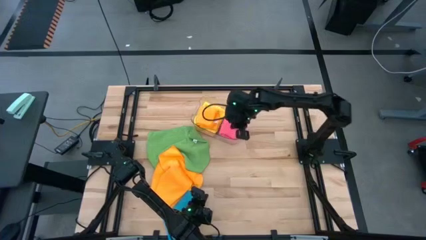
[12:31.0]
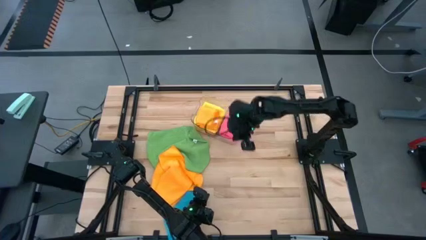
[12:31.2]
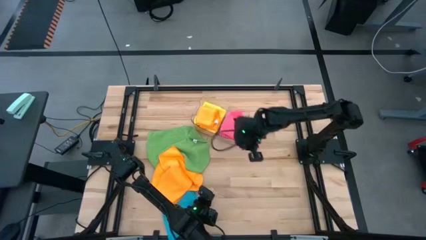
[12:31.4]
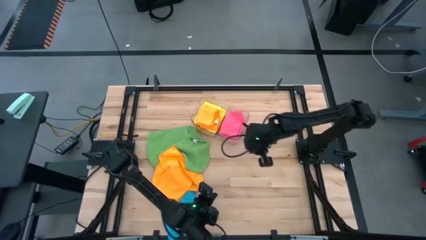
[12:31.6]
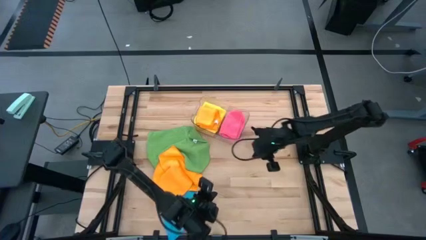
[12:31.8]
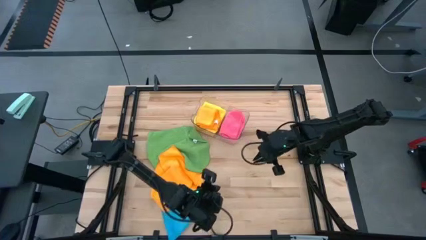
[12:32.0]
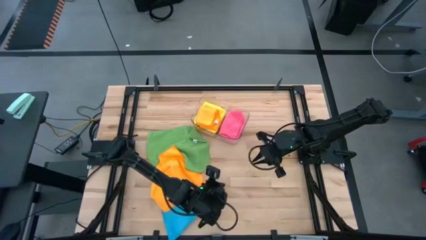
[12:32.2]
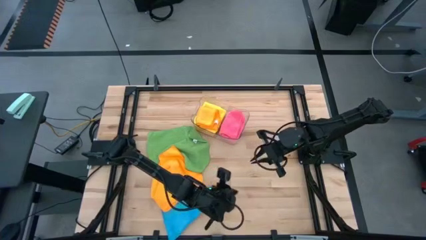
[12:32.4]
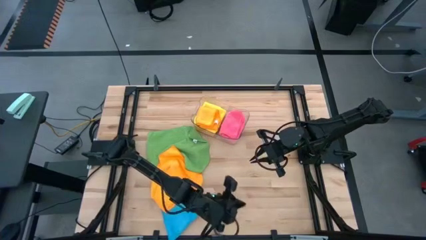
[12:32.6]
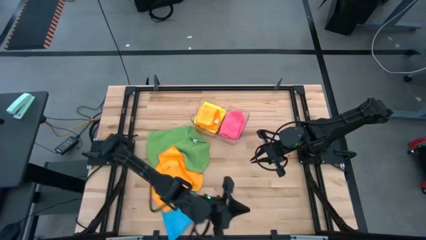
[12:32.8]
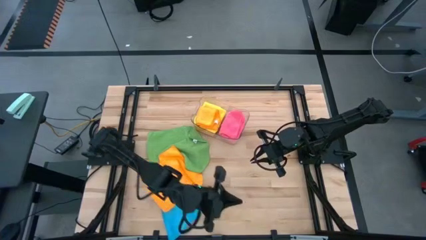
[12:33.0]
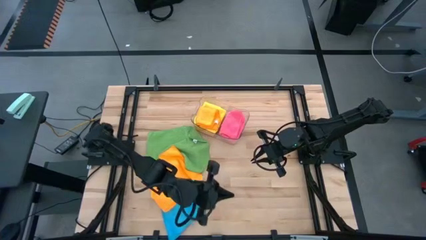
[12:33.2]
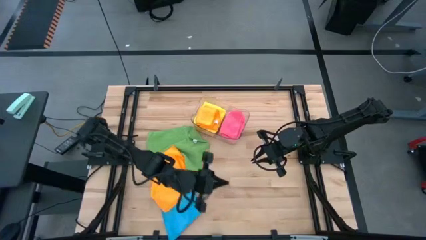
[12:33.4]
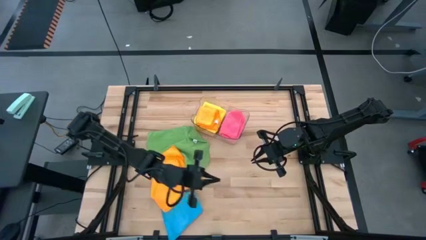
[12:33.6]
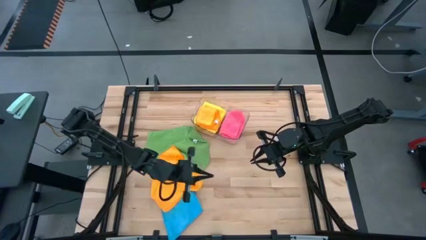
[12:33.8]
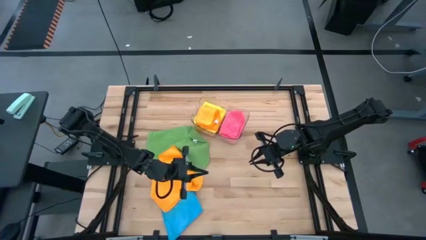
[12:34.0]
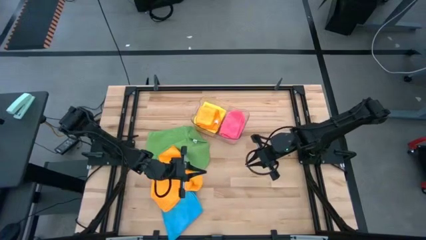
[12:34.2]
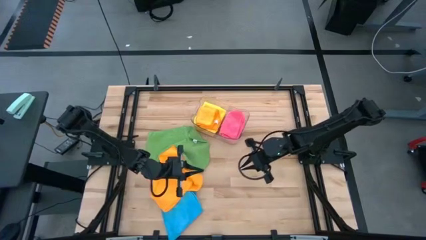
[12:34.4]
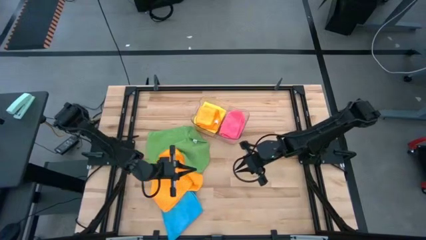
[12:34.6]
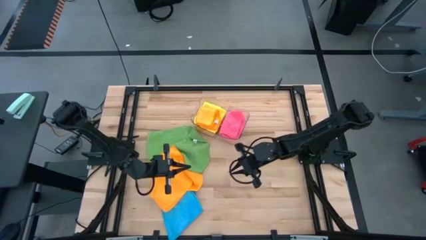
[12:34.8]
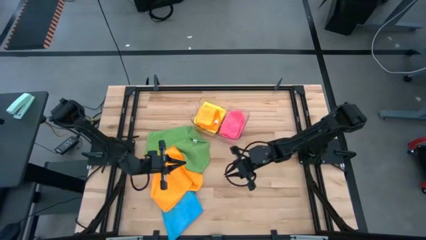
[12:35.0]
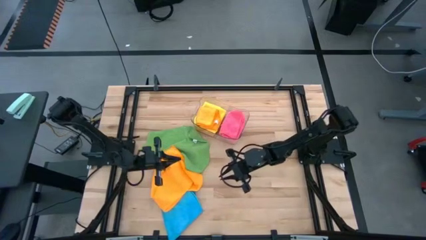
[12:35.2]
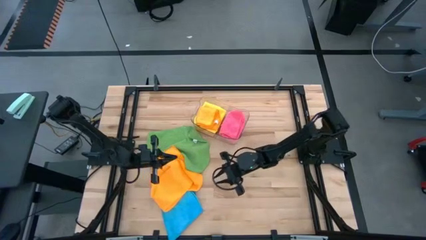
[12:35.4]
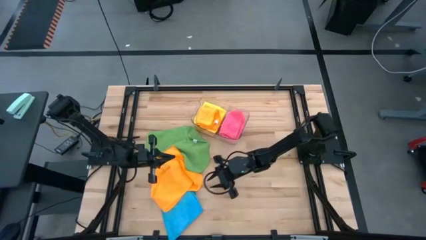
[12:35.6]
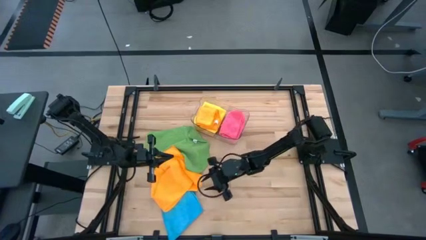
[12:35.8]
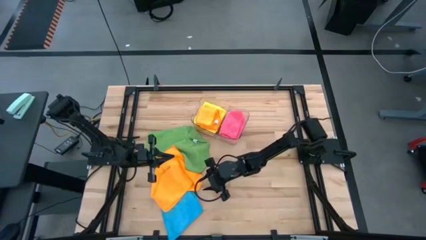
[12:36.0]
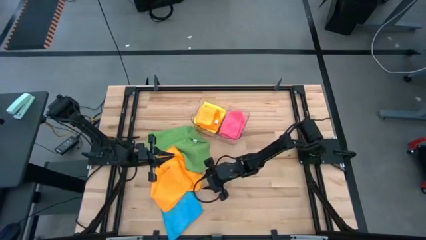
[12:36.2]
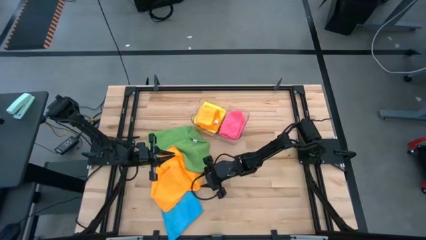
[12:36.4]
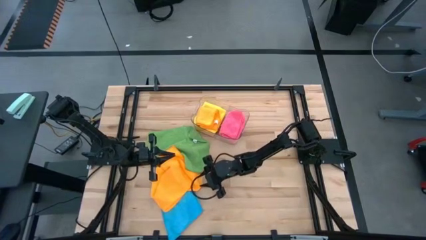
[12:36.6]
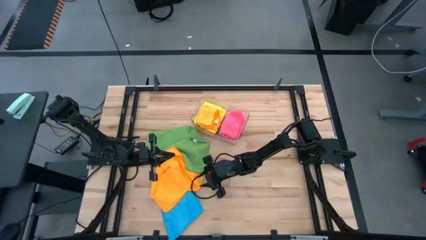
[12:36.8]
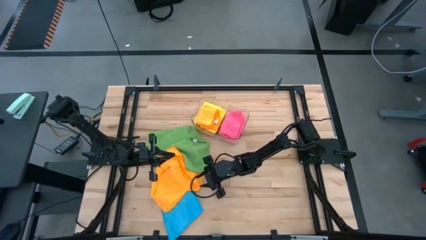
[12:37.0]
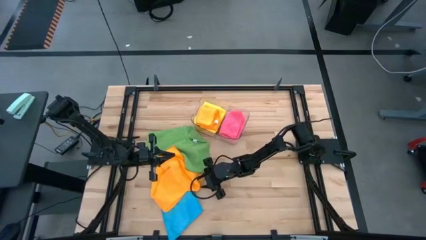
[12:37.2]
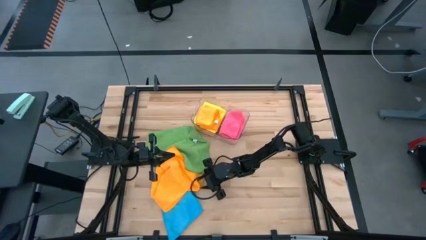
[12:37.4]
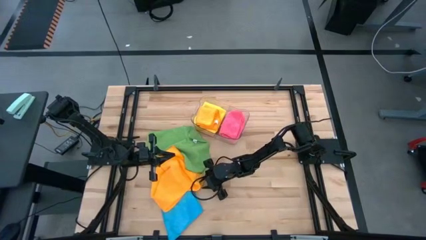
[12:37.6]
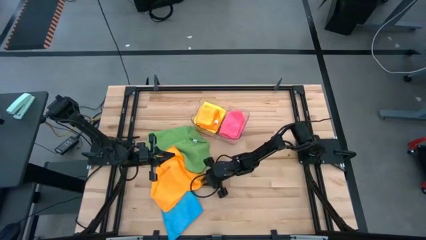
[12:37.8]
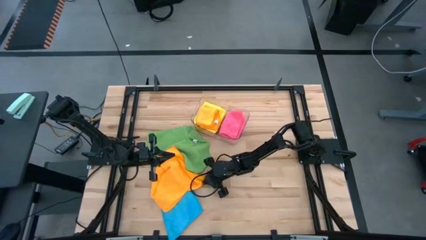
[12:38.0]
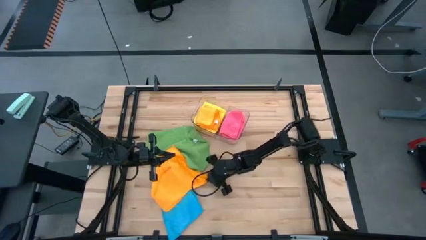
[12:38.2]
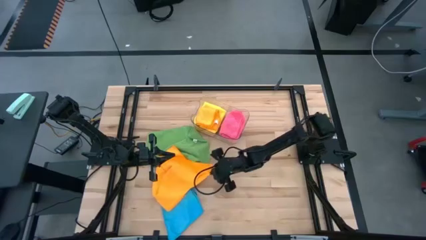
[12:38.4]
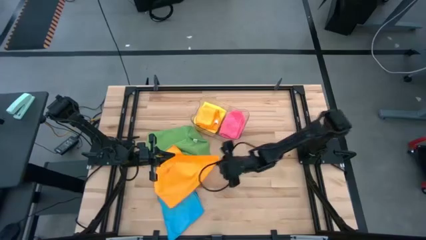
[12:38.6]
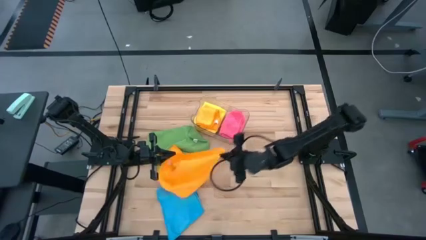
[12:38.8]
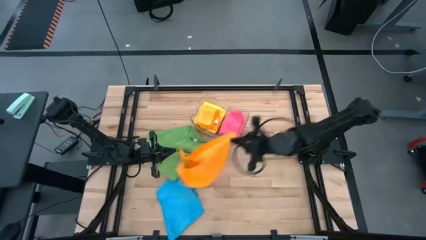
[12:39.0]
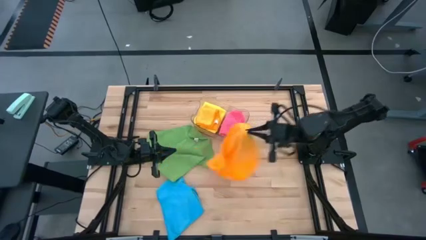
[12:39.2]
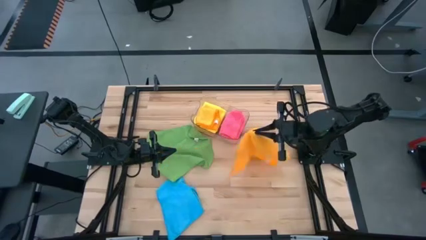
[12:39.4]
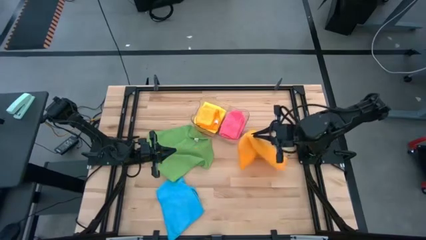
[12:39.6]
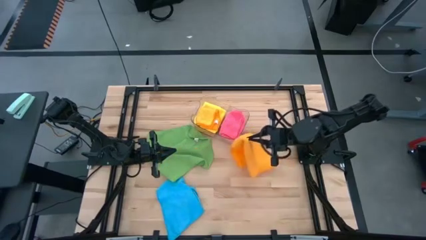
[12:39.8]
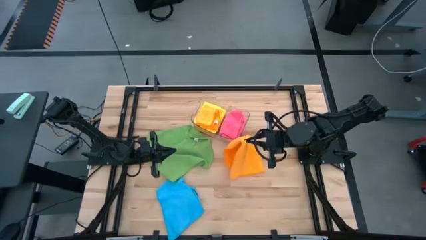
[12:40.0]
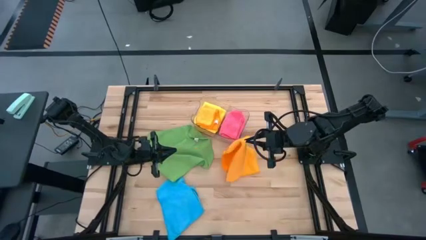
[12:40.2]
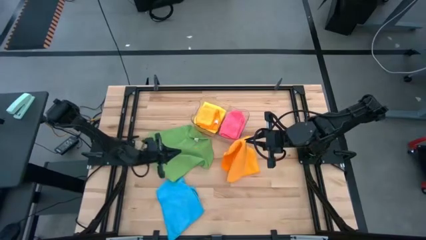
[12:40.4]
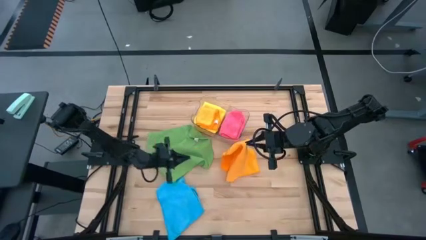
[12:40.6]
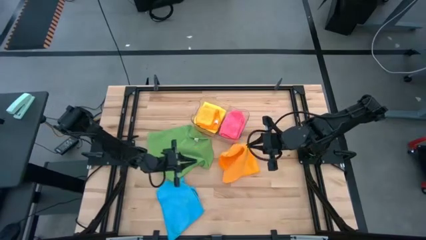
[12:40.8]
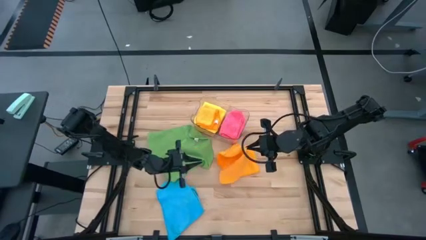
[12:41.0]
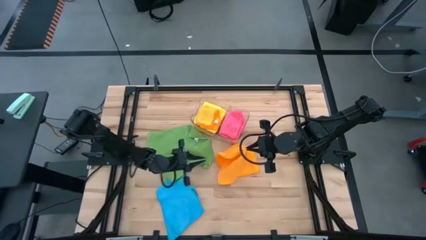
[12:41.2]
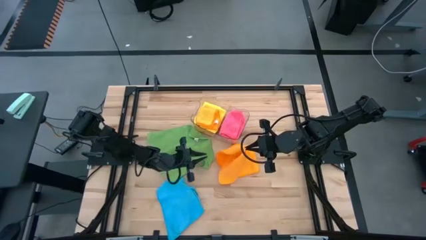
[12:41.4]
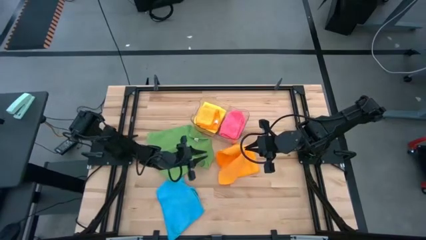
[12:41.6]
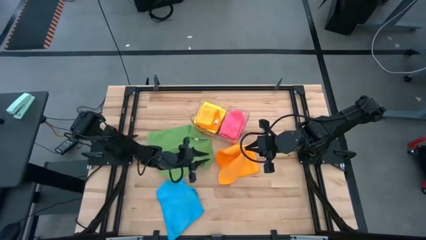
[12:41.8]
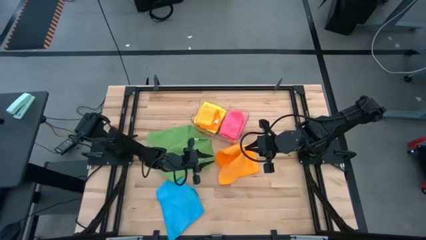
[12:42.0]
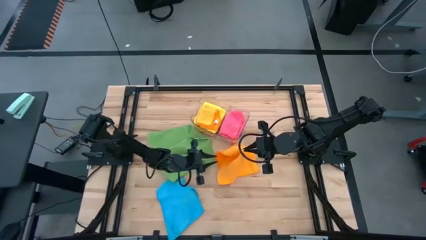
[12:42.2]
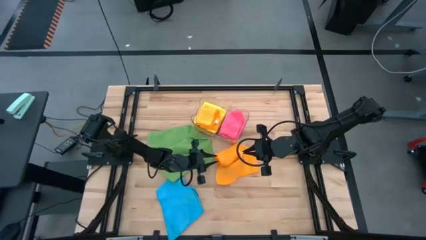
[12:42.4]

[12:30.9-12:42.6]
Task: Fold microfiber towels
Fold the orange microfiber cloth

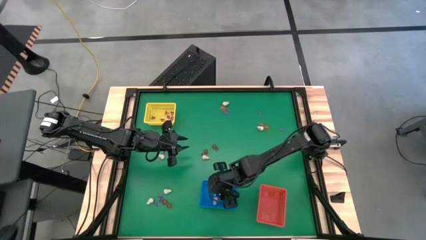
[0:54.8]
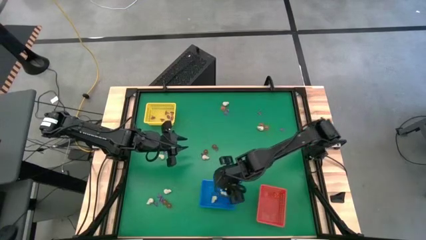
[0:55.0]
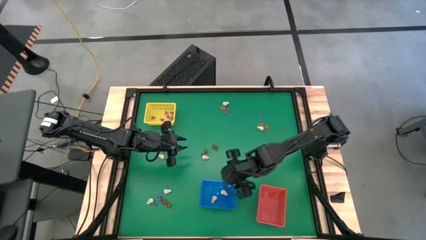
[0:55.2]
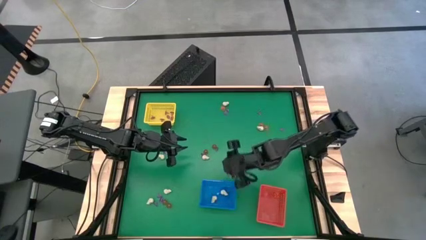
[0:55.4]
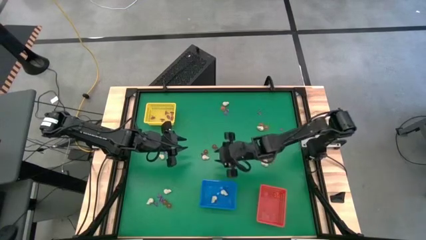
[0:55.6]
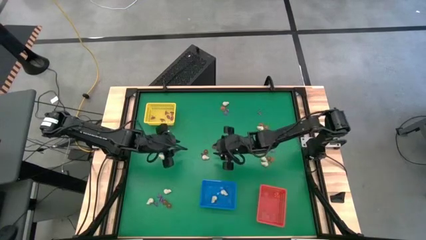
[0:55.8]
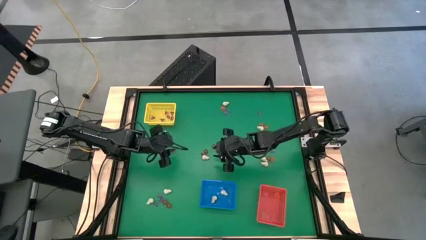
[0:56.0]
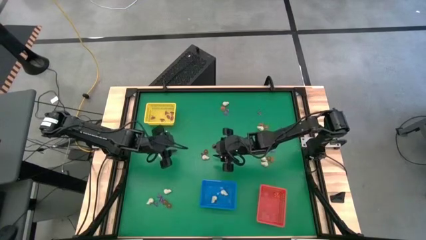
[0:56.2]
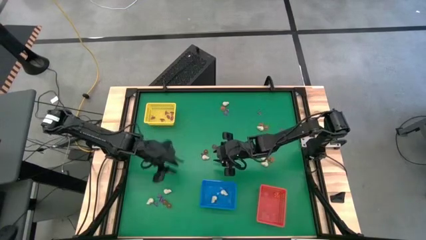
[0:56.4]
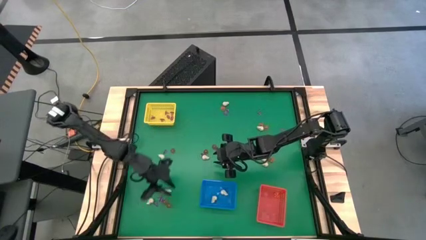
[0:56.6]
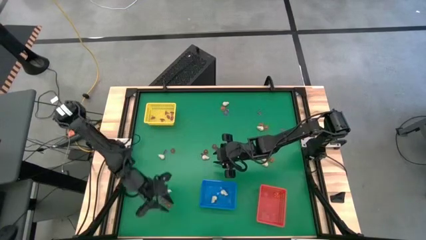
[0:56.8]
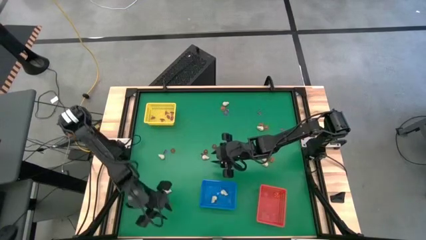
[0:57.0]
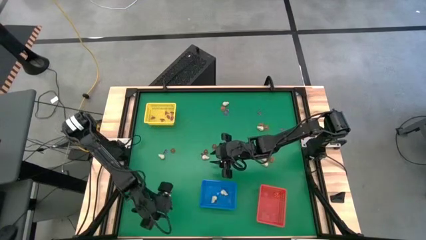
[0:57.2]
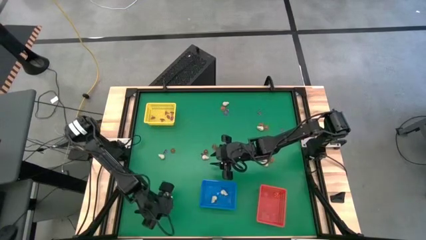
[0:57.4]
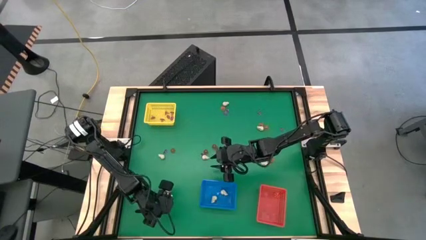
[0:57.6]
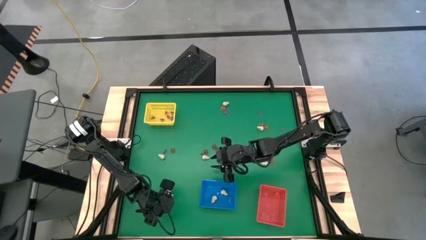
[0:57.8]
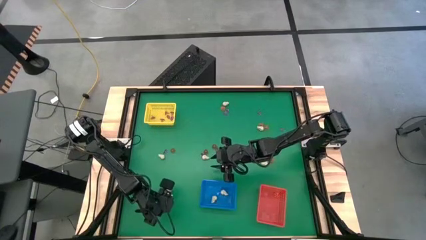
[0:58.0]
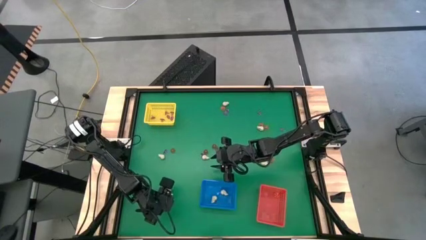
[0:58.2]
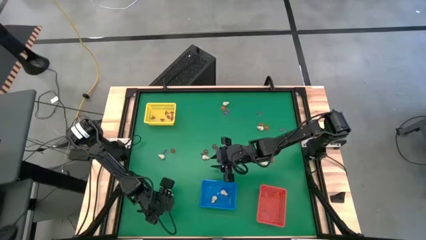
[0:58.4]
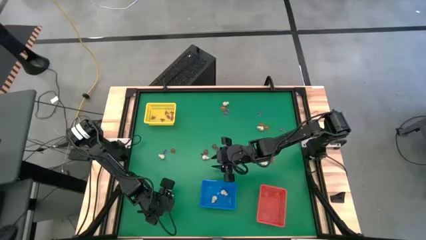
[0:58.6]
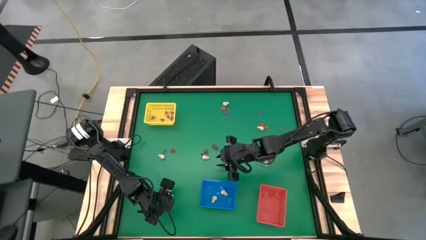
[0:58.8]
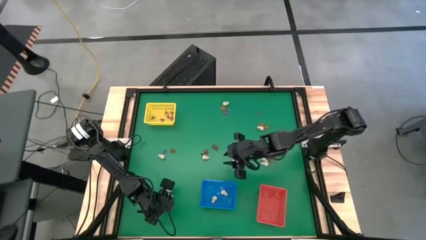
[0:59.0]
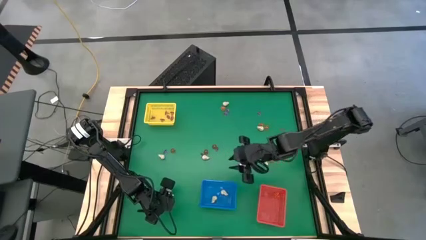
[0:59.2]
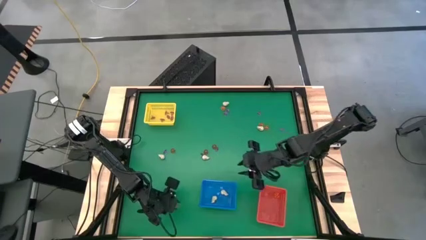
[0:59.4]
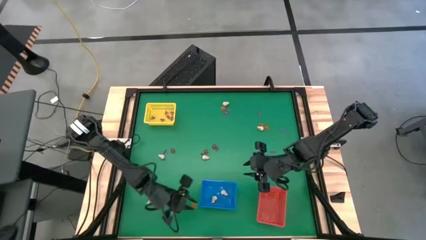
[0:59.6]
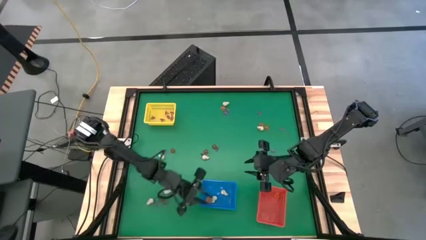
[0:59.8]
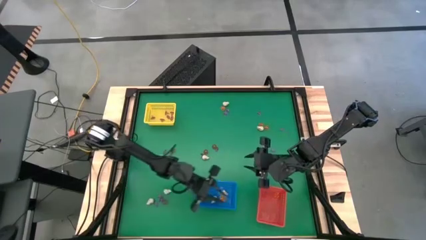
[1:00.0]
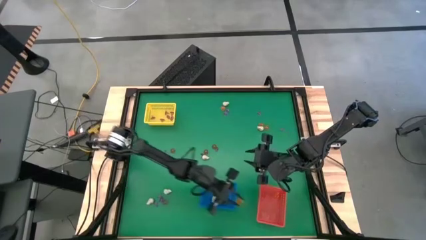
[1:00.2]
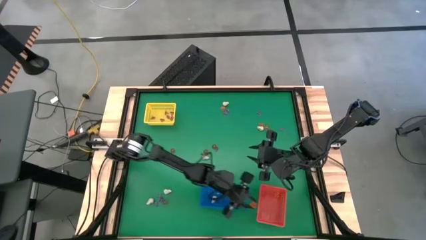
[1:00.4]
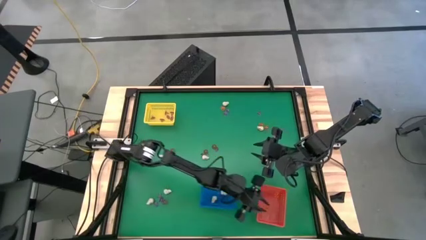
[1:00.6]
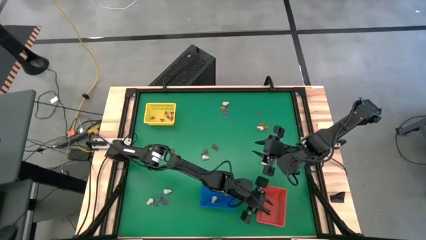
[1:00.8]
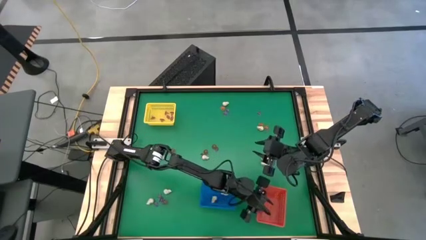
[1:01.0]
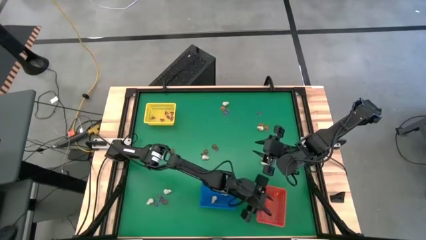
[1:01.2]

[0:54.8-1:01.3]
Task: Sort Halloween decoration
Put the orange pumpkin toy into the orange basket
